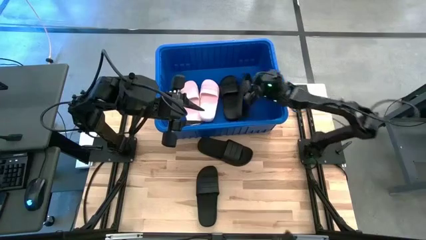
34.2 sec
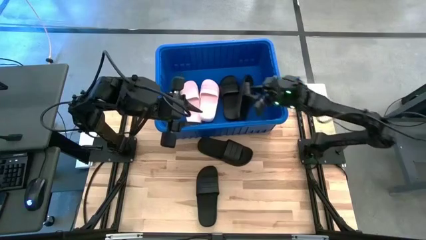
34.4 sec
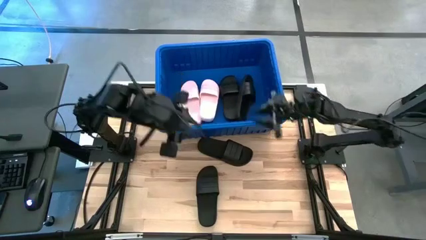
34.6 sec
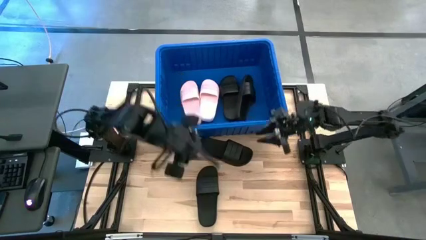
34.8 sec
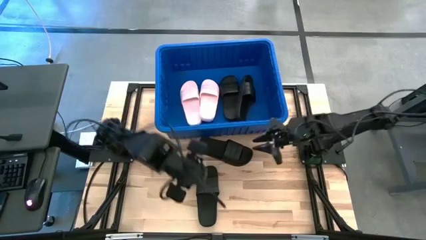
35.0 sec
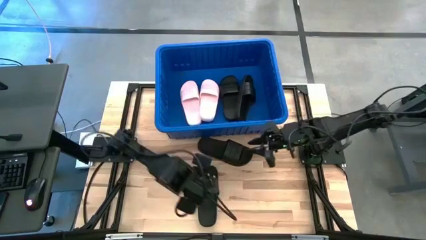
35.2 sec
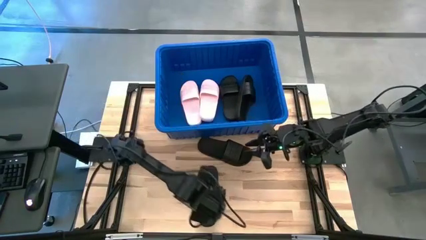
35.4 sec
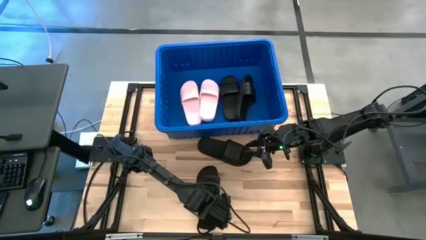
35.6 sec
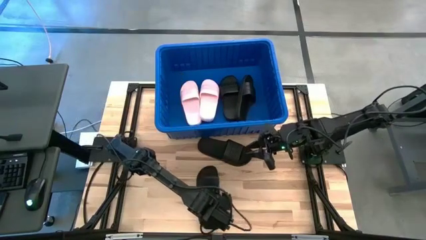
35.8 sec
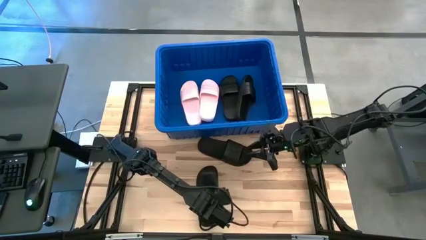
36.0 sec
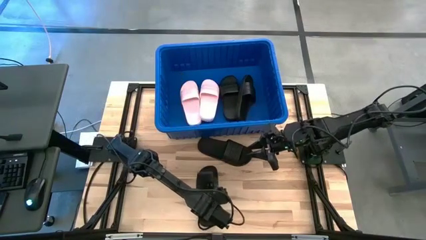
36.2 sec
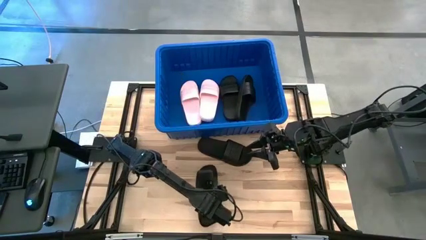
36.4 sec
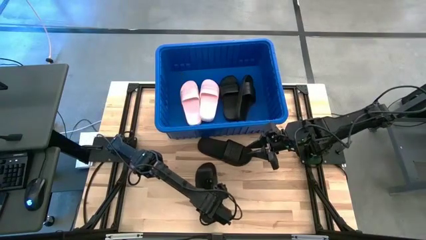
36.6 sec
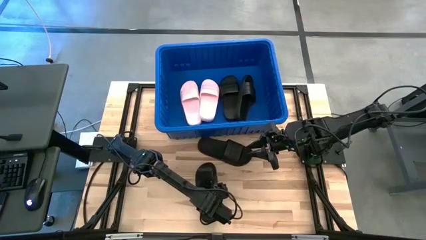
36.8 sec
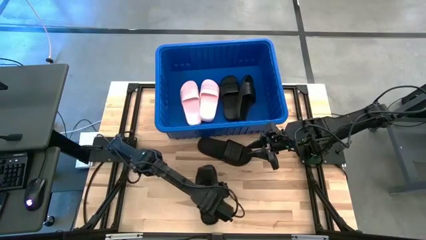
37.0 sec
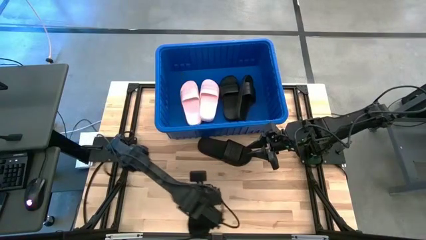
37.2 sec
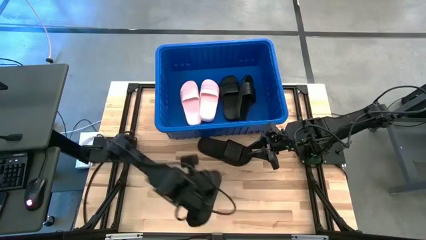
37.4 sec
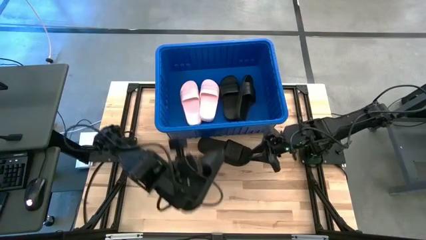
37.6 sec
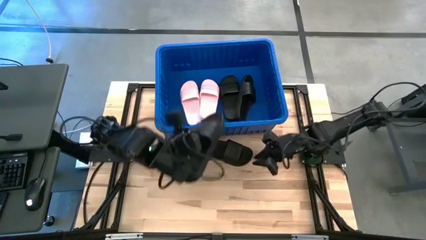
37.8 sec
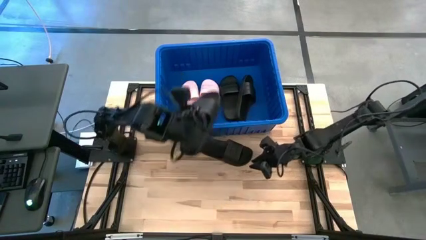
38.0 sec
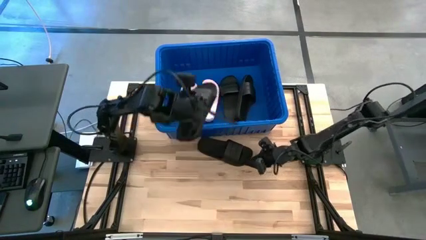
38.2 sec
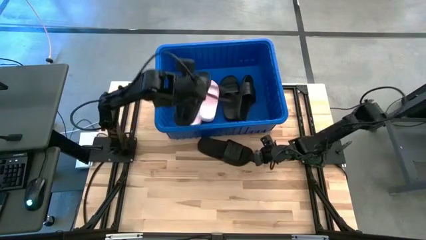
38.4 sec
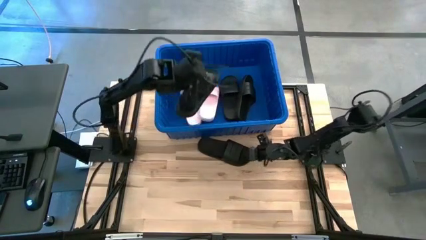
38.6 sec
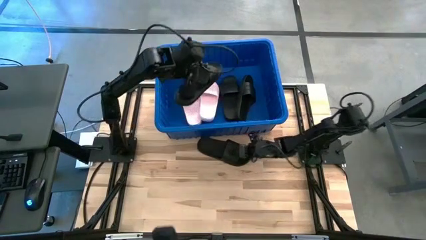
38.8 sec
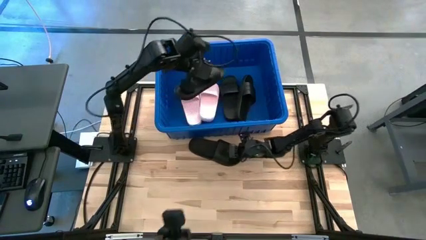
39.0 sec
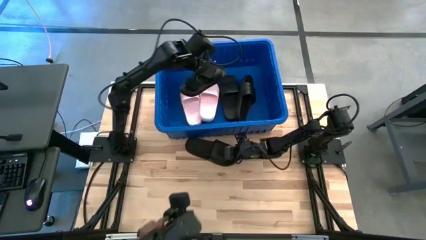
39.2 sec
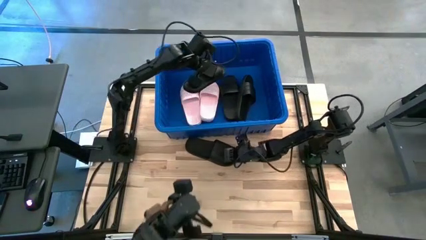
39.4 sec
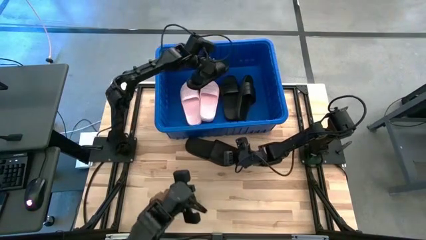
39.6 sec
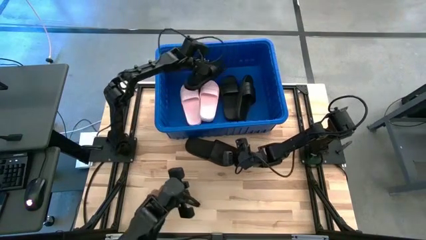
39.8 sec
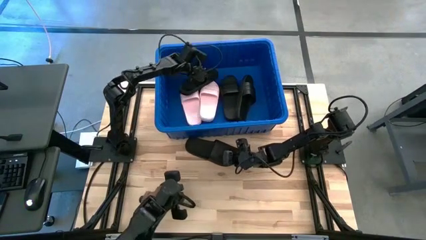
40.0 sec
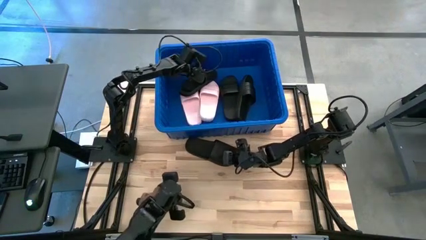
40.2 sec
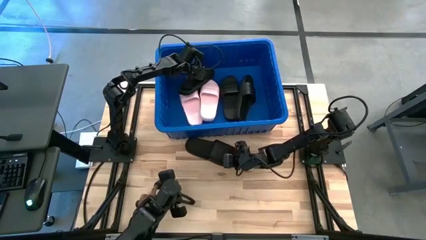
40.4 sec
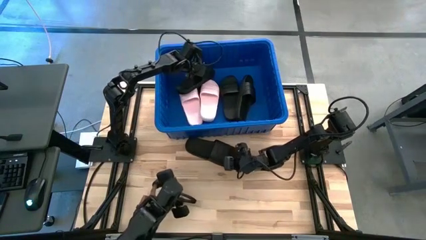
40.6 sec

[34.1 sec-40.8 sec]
Task: Pick and place slides into bin
Put the black slide into the blue container

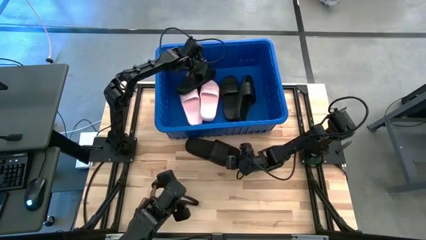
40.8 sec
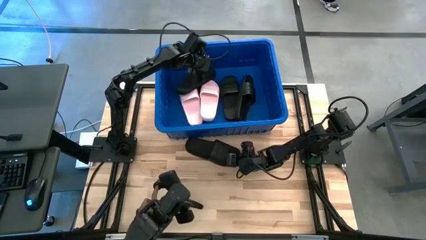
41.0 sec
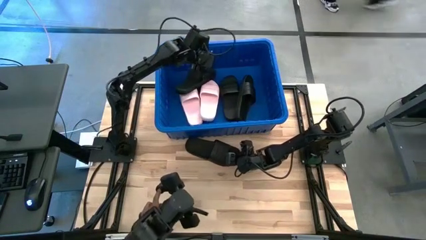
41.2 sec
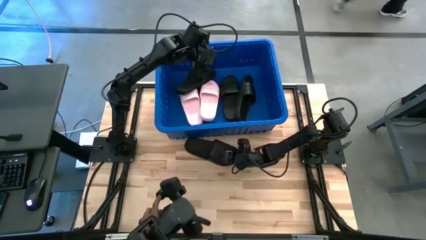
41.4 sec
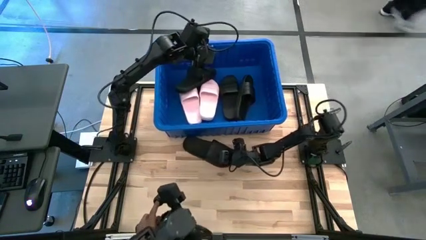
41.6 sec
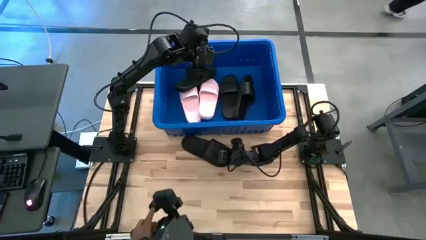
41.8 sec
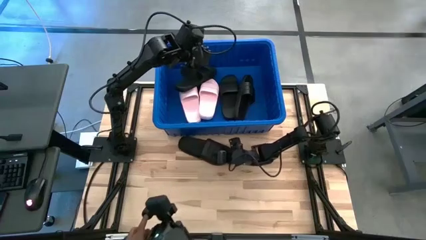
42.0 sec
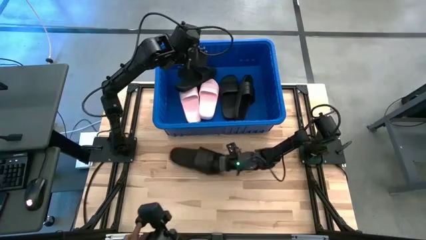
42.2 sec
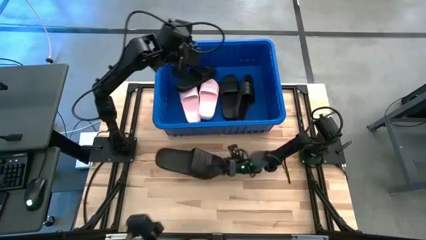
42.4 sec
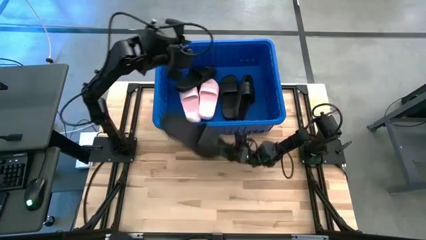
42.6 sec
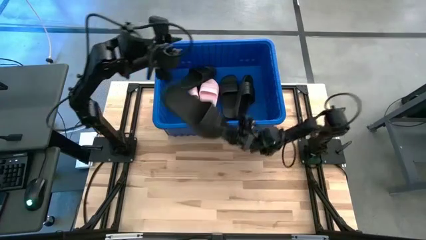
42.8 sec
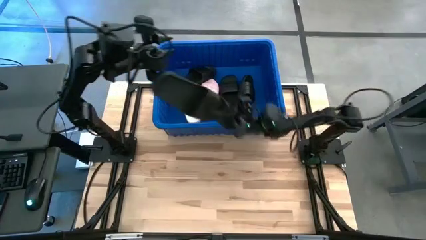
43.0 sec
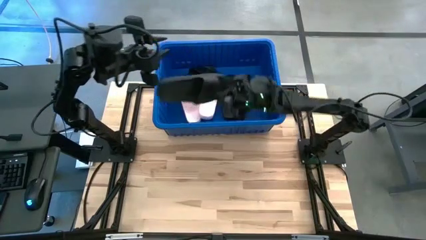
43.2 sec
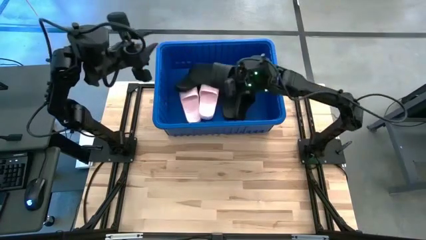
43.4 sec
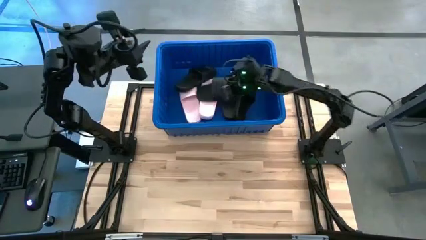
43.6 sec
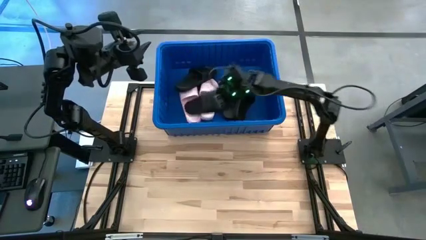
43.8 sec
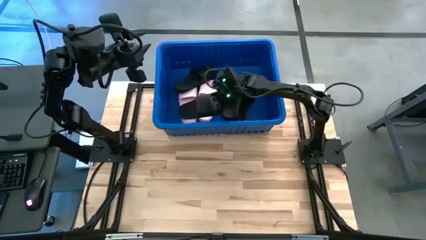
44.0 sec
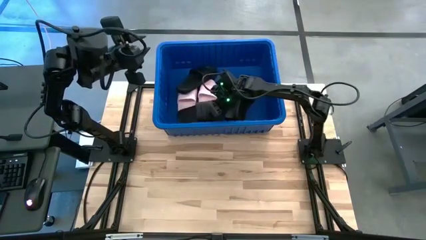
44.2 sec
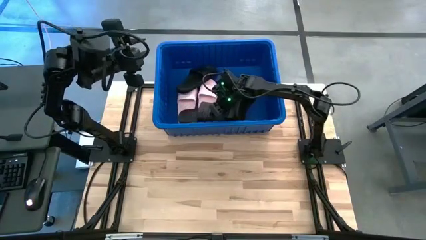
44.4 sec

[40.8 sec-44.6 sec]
Put the black slide into the blue container

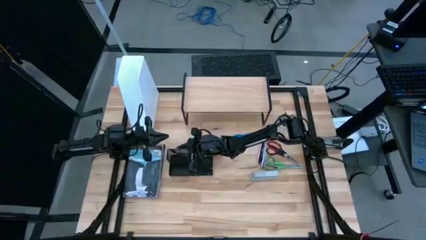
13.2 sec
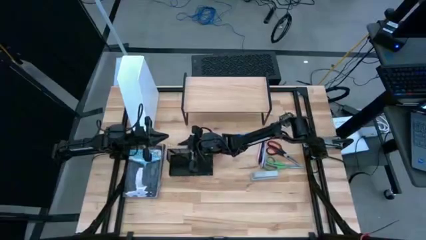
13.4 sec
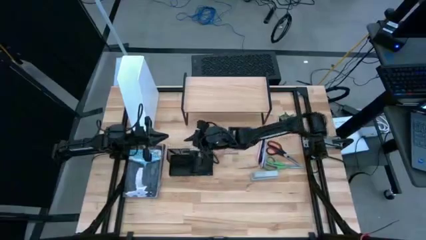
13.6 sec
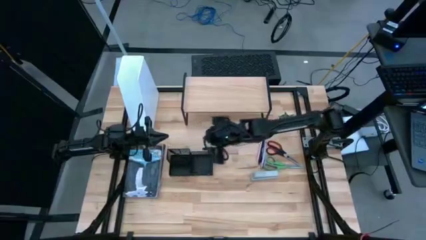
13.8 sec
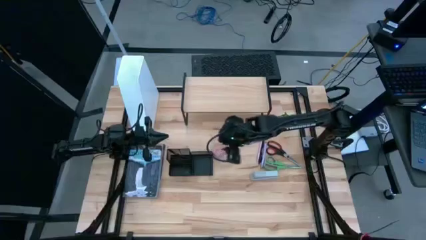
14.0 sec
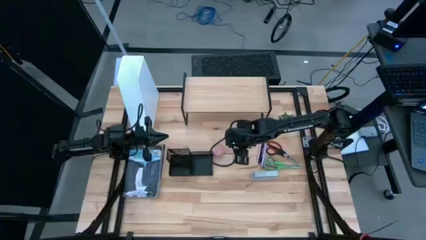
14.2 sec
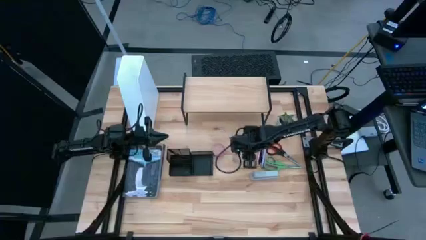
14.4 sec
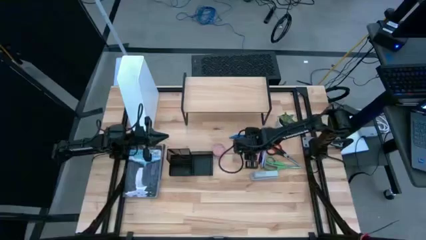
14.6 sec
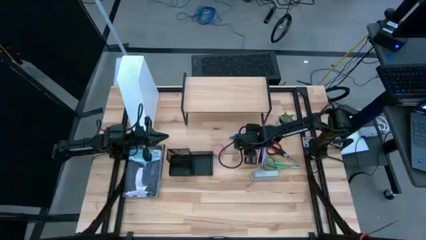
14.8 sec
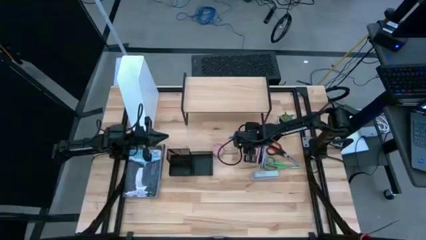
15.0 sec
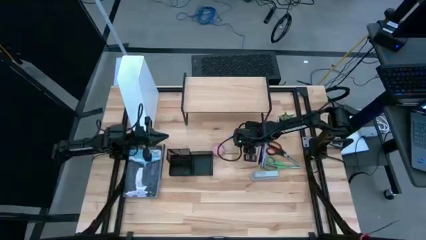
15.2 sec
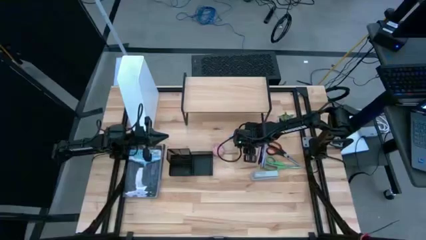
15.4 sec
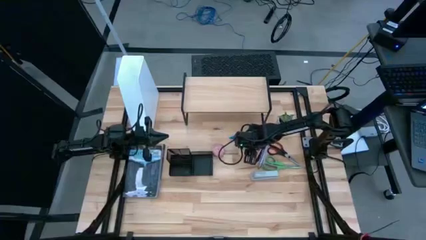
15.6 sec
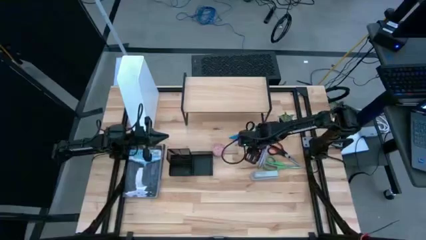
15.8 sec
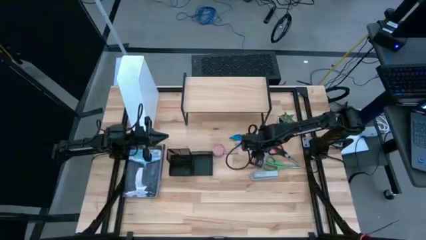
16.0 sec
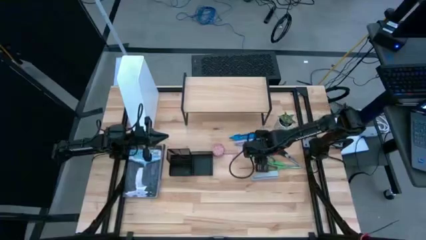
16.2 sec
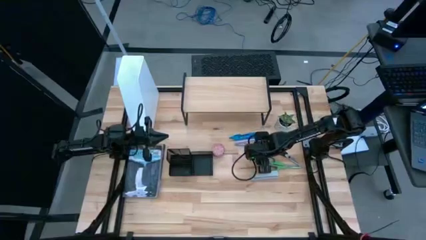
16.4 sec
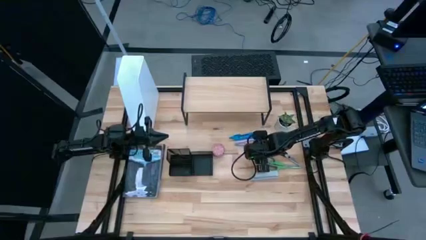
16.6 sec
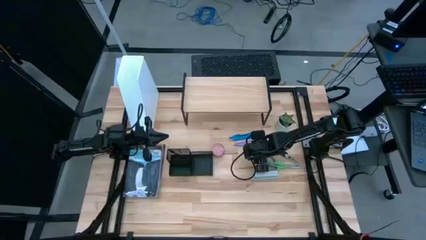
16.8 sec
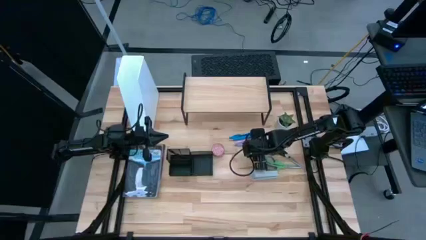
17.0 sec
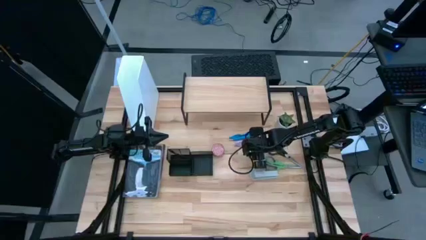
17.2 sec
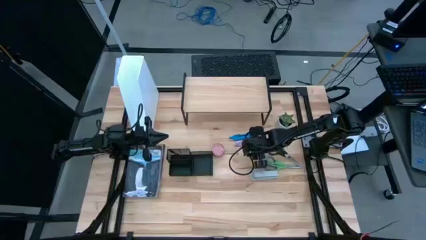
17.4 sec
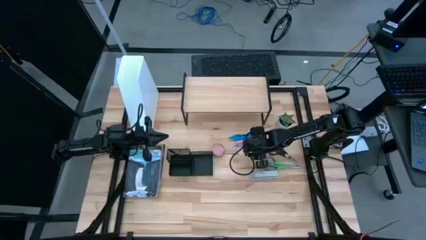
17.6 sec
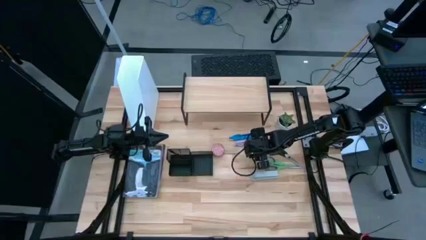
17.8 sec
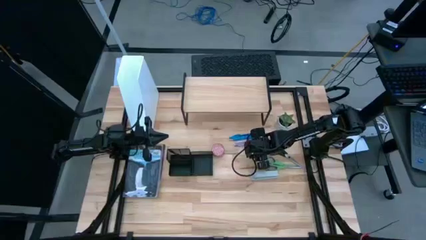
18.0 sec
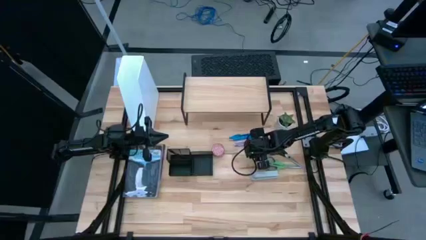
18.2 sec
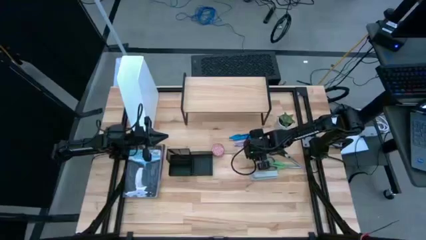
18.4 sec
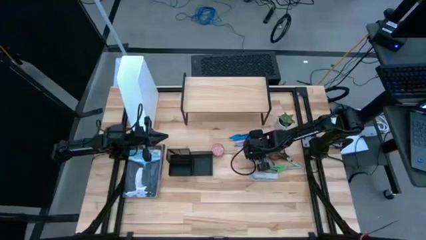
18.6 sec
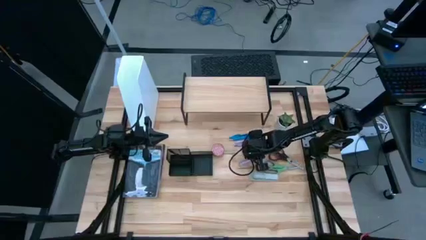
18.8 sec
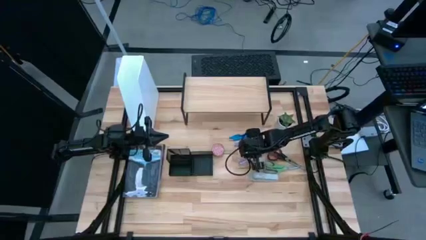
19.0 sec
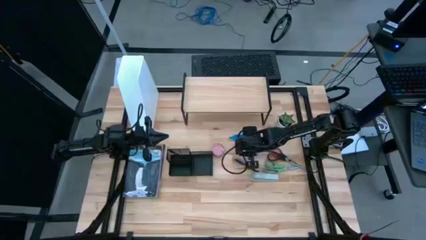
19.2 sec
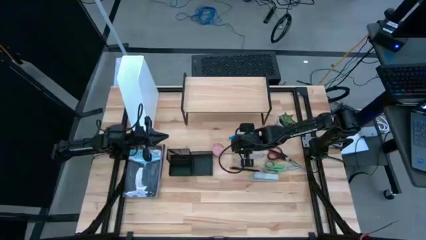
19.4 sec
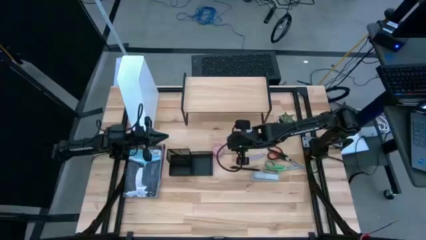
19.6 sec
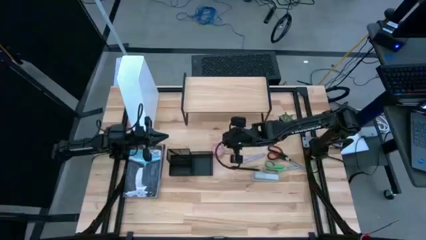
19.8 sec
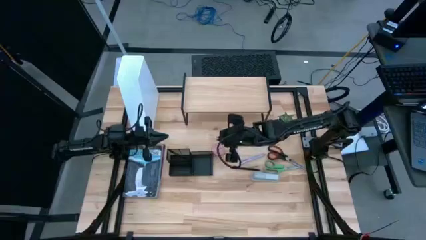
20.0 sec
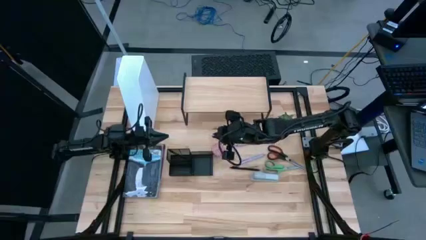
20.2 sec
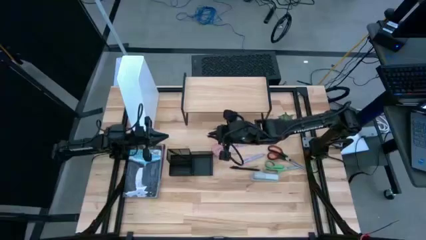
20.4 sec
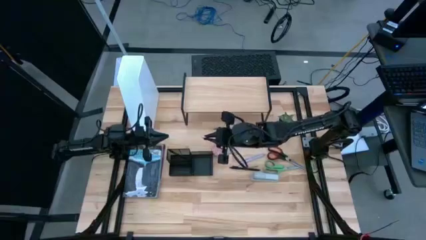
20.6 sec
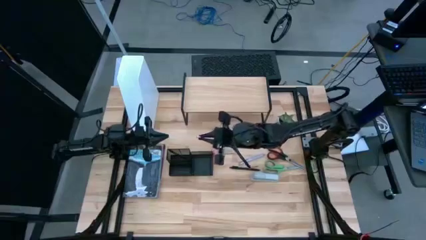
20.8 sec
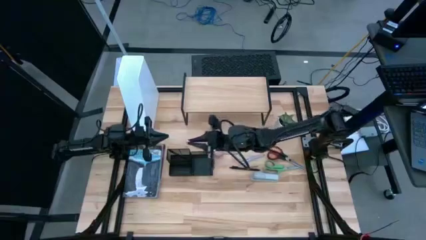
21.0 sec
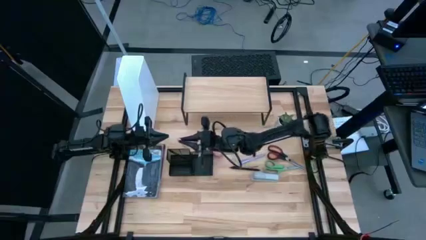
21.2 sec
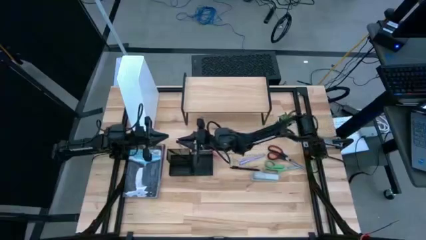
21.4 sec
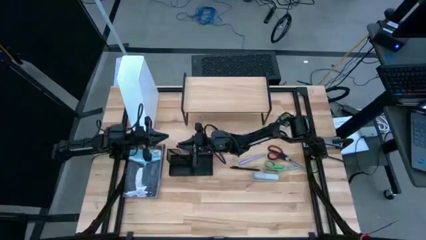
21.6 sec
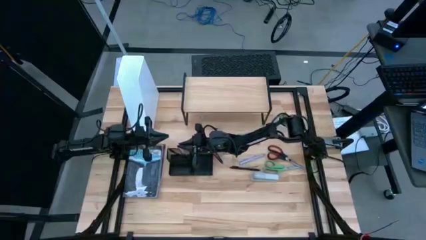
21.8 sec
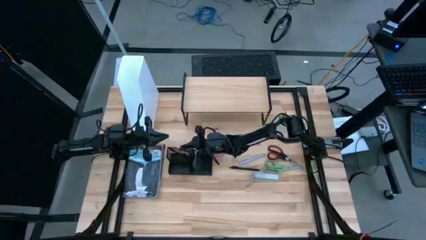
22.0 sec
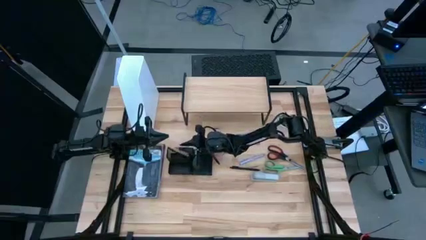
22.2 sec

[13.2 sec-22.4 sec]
Task: Stock shelves
Put the pink pen into the desk organizer
